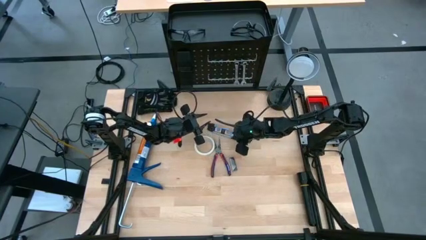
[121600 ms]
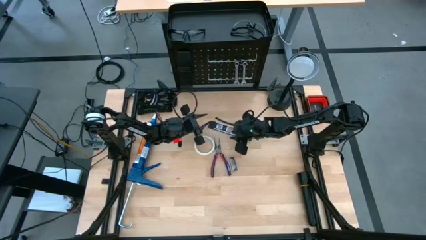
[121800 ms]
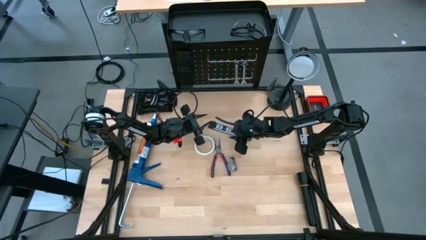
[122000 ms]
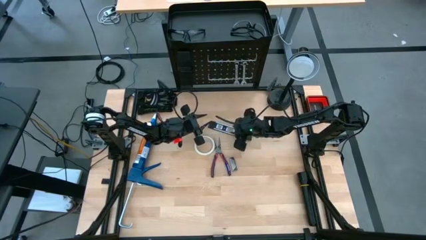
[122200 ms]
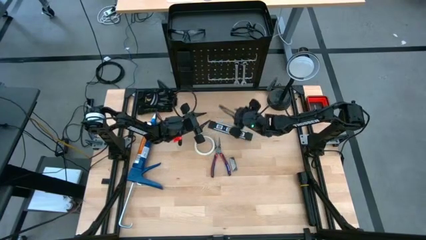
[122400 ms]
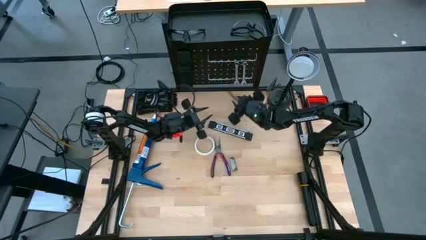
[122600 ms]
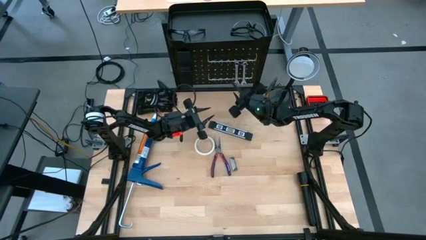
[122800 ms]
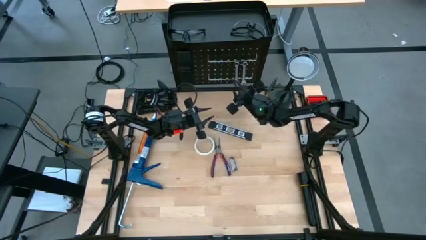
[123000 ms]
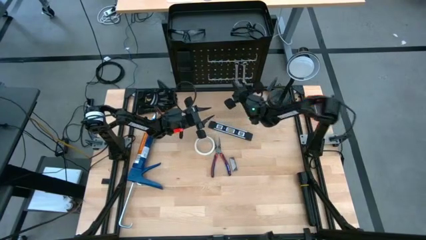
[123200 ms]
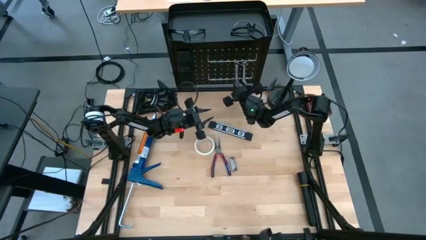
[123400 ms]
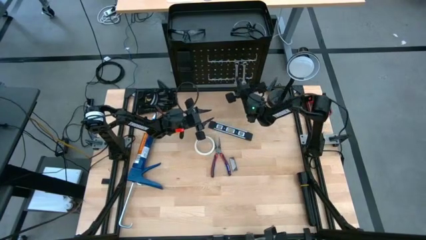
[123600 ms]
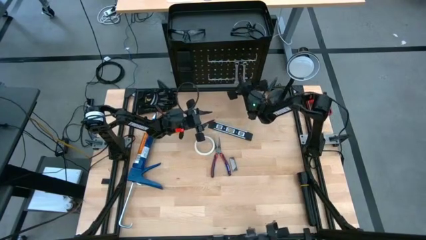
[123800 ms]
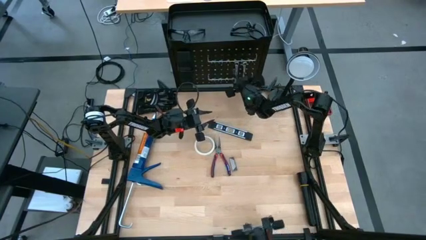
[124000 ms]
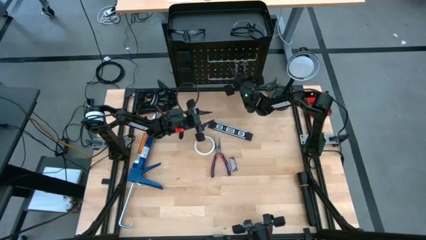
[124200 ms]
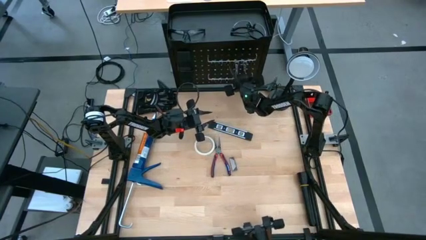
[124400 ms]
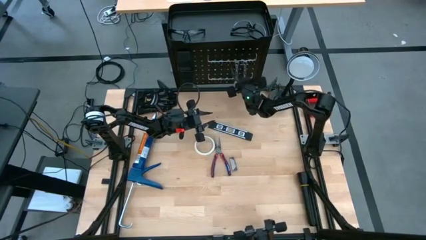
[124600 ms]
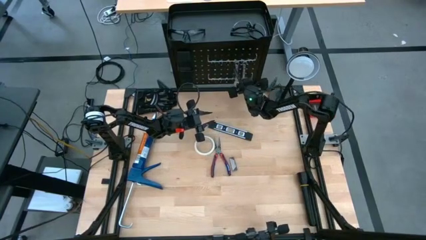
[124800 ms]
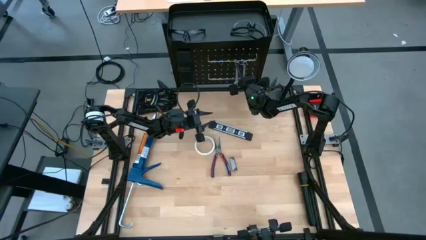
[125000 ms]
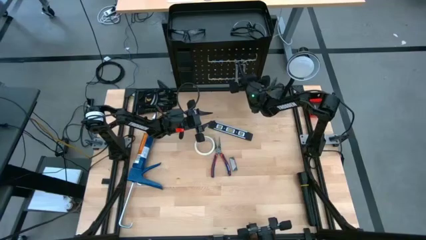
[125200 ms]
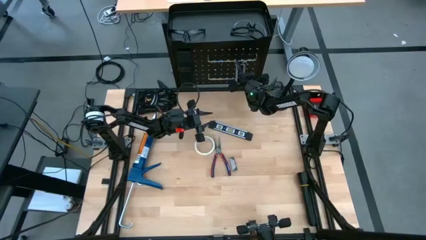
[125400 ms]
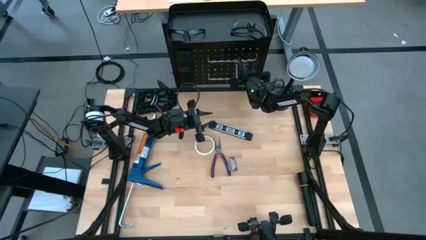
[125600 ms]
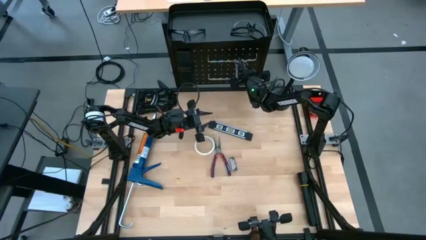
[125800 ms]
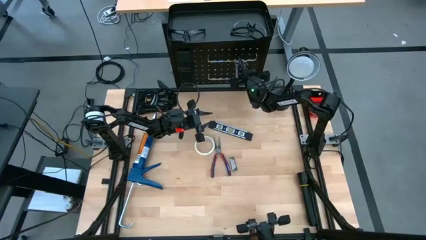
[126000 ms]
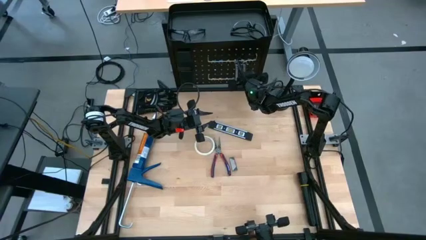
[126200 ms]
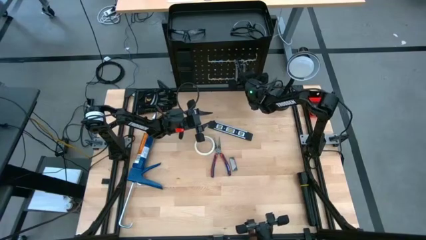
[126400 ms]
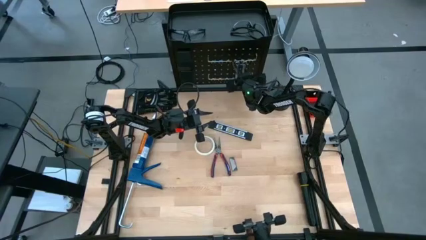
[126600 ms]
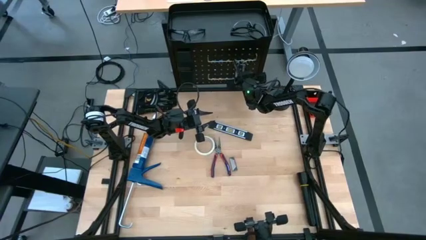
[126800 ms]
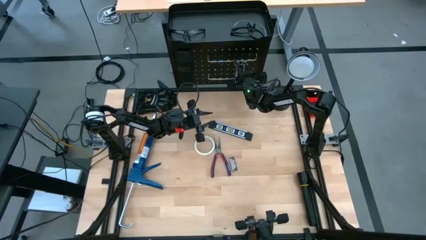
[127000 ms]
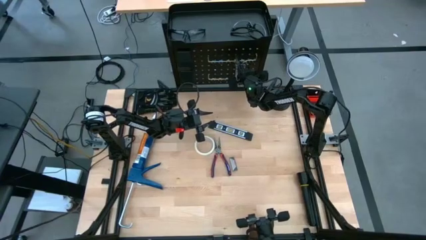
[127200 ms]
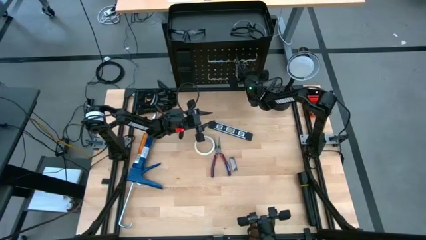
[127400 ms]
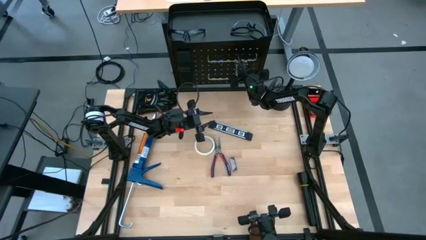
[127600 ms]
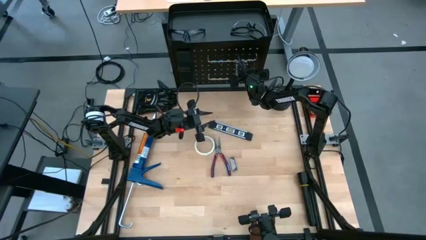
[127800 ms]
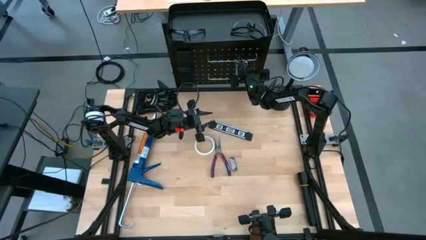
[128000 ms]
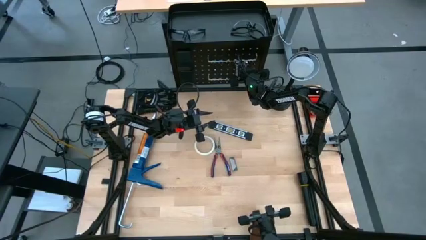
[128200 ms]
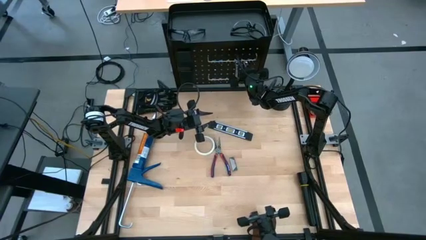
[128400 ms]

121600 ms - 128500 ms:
Task: Hang tools onto peg board
Unhang the right silver wrench from the black peg board

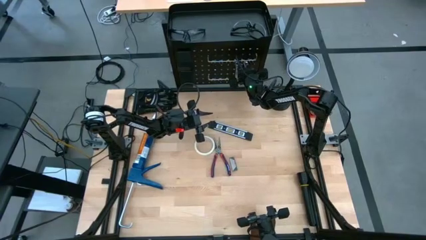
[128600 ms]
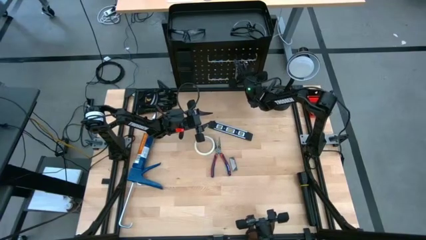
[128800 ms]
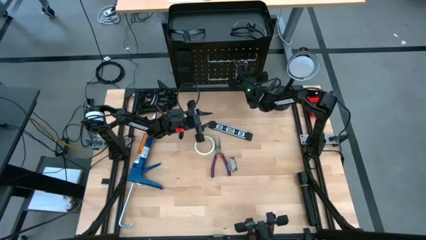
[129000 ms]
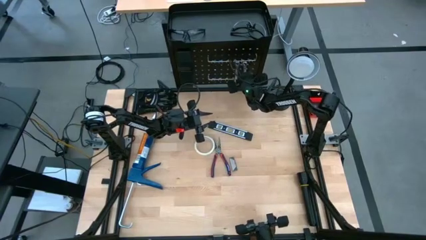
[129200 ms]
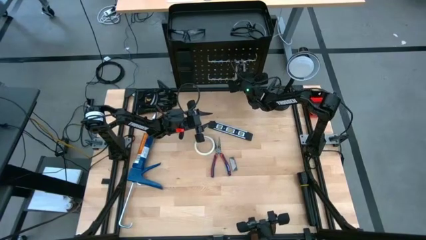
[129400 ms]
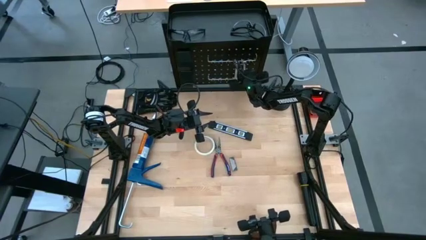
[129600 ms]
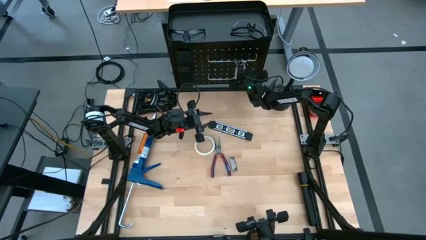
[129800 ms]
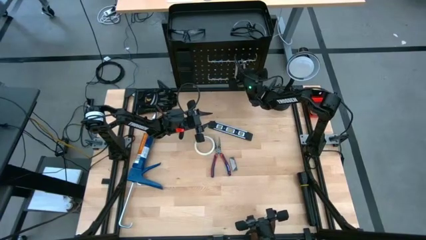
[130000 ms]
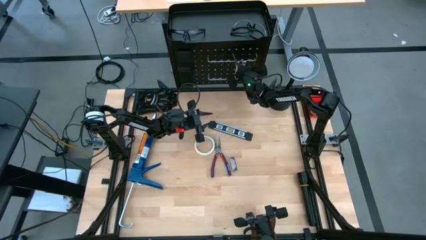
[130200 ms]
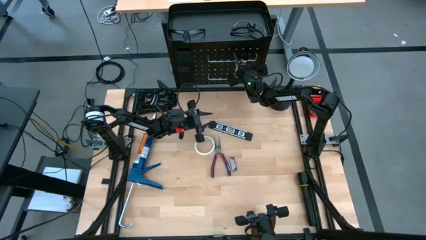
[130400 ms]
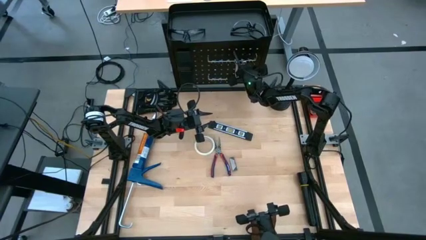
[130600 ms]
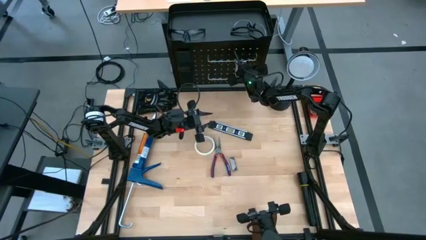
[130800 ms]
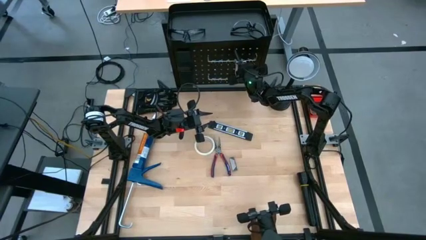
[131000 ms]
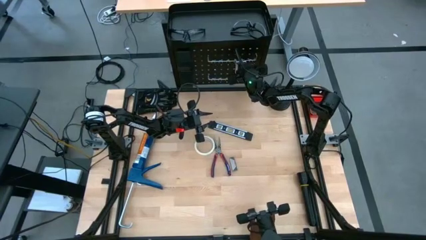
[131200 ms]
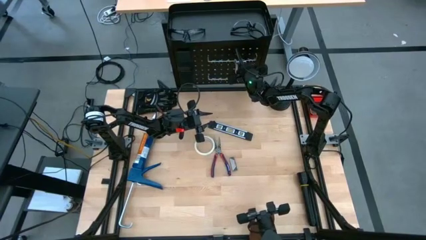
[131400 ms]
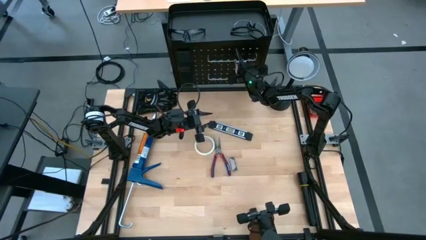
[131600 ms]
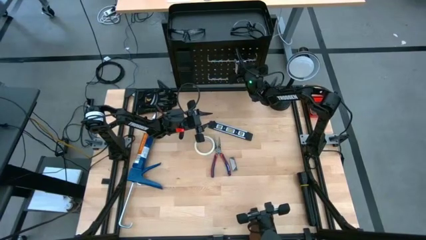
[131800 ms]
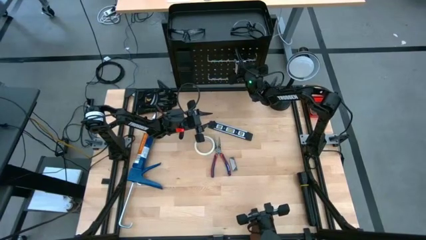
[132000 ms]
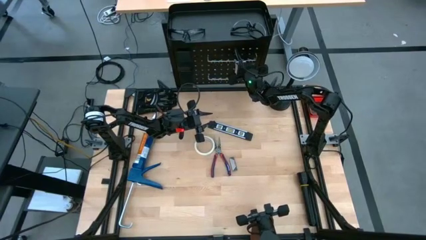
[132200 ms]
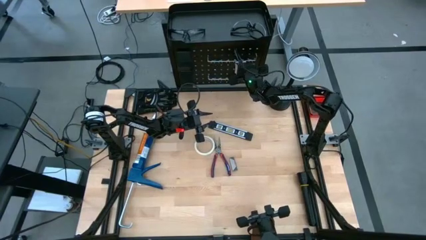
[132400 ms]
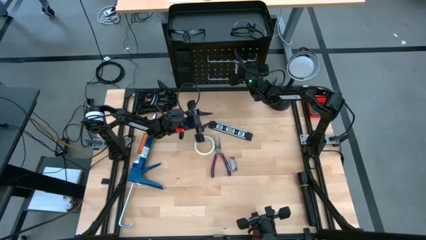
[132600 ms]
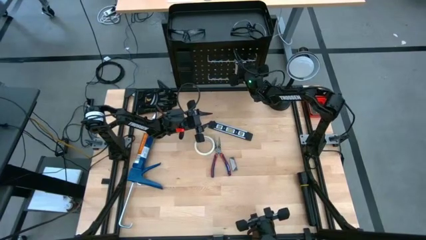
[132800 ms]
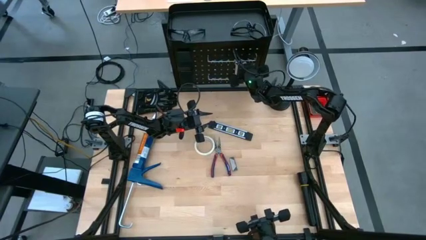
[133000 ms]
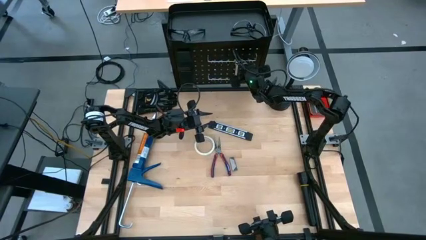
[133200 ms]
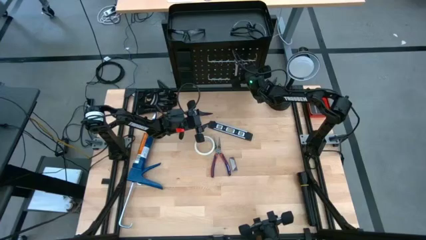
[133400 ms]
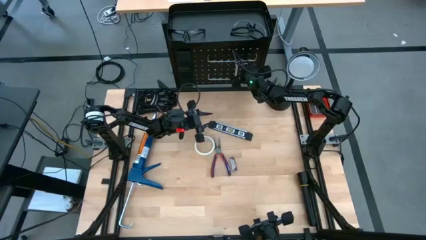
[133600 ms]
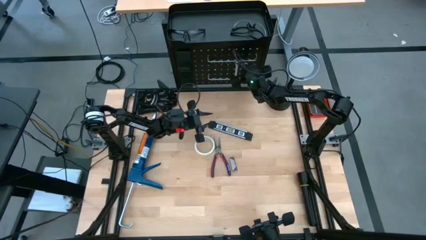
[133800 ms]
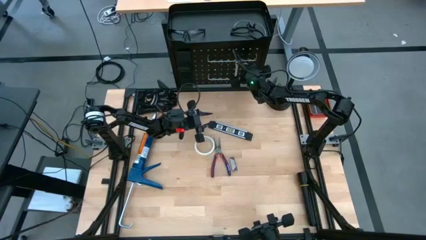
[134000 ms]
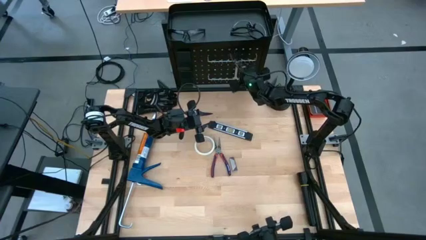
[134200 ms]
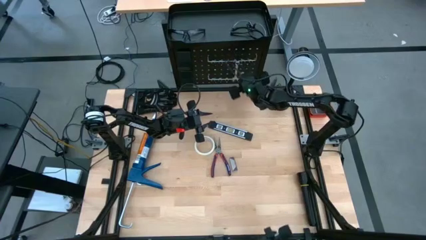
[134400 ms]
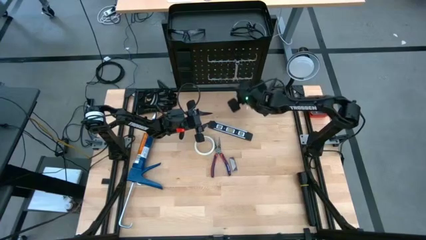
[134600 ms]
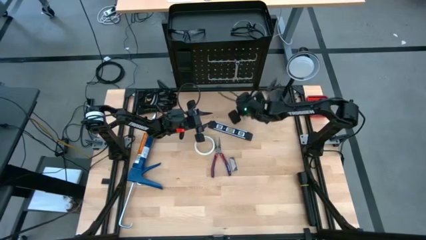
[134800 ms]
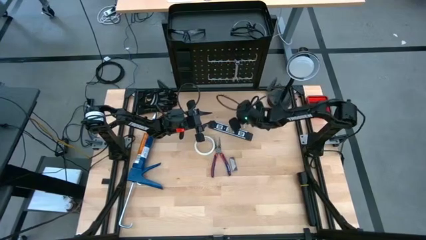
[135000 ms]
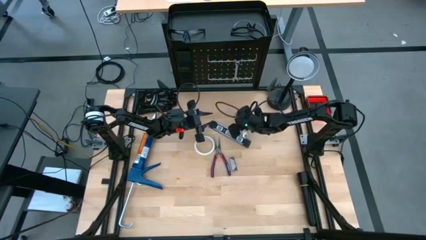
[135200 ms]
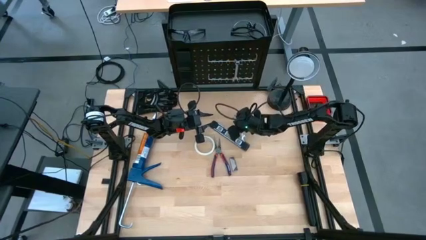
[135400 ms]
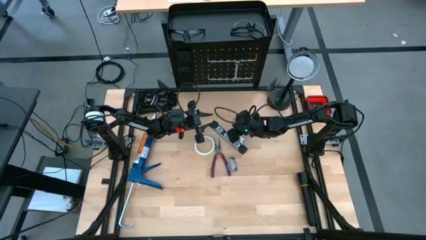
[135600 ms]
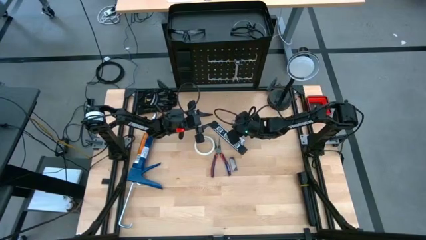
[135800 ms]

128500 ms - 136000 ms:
Unhang the right silver wrench from the black peg board
